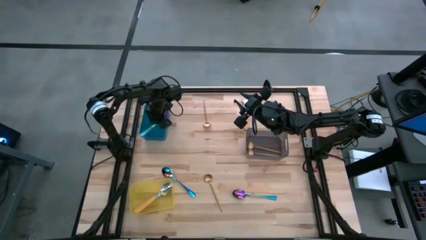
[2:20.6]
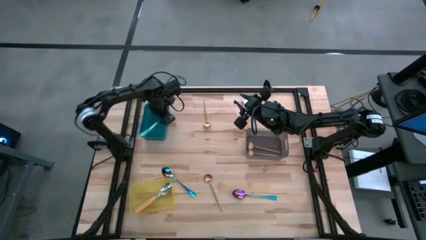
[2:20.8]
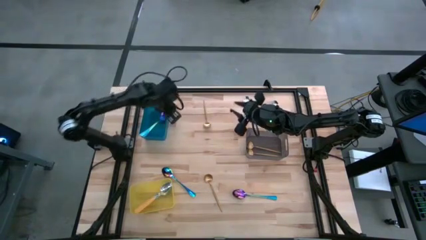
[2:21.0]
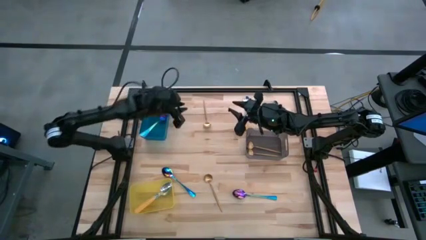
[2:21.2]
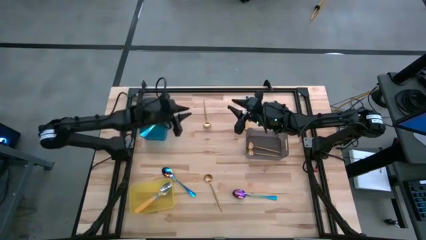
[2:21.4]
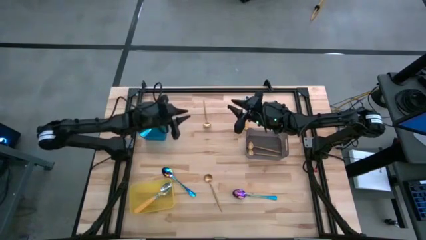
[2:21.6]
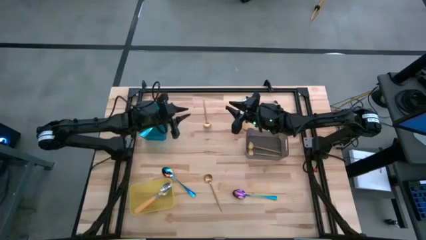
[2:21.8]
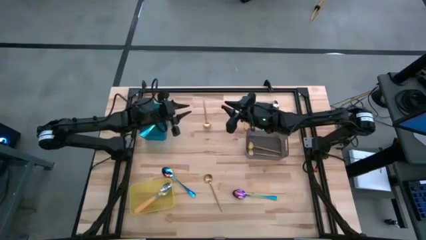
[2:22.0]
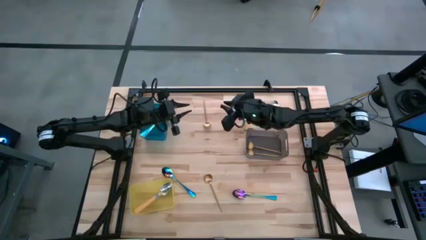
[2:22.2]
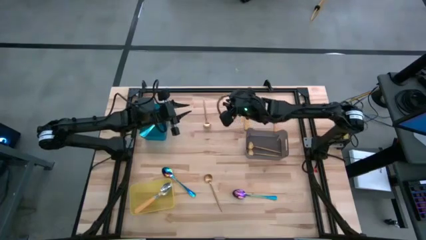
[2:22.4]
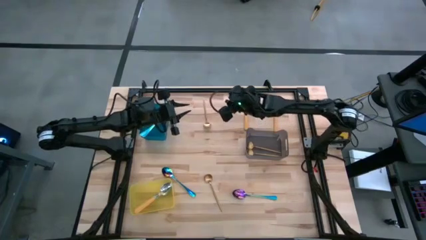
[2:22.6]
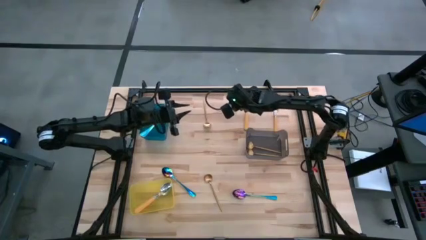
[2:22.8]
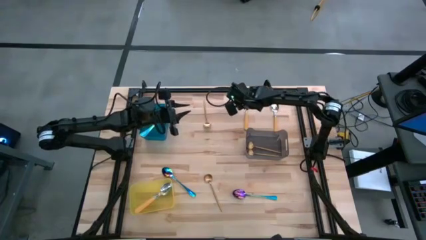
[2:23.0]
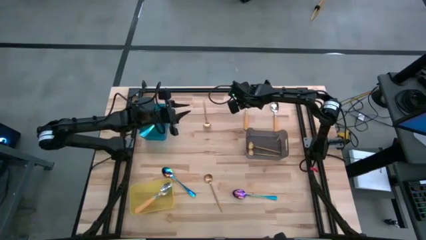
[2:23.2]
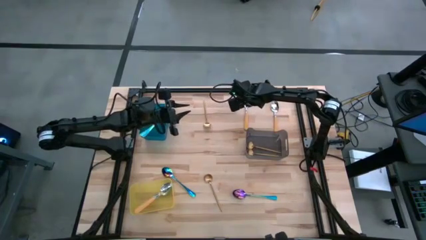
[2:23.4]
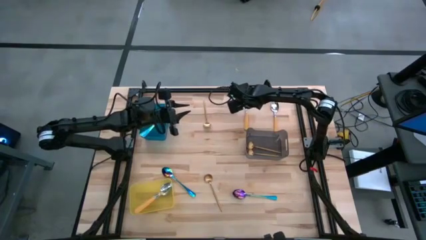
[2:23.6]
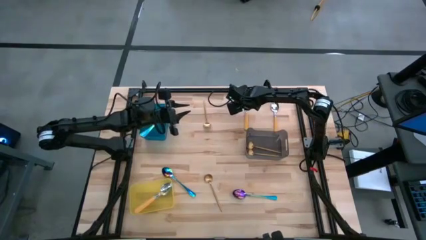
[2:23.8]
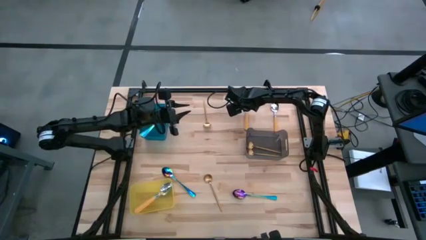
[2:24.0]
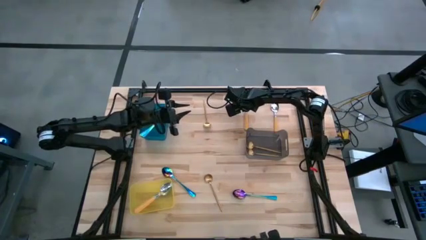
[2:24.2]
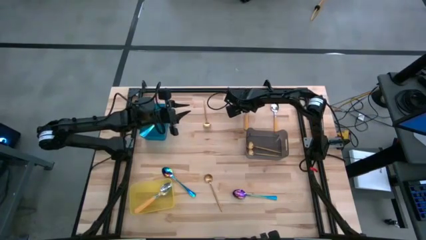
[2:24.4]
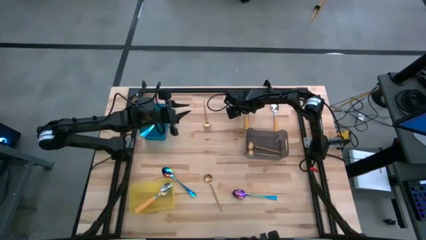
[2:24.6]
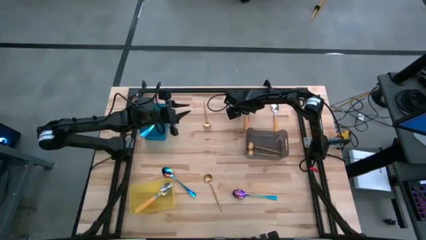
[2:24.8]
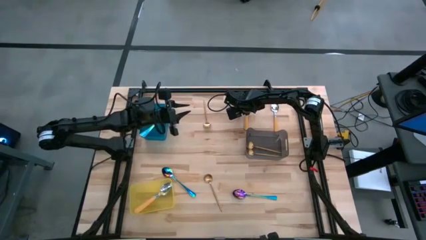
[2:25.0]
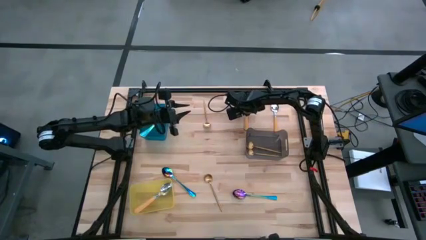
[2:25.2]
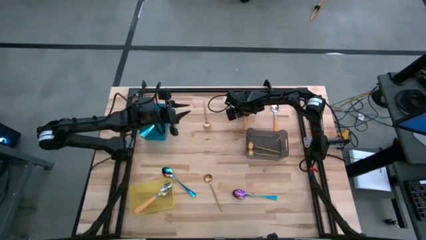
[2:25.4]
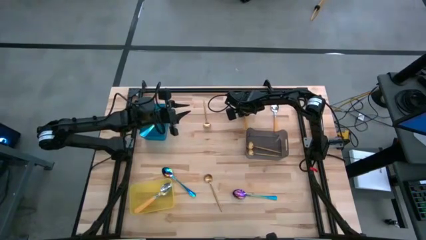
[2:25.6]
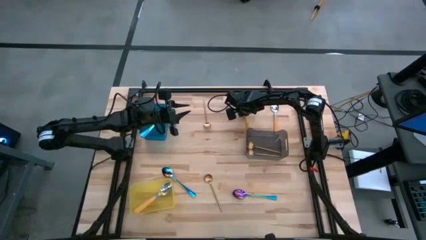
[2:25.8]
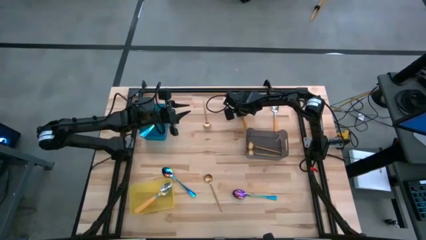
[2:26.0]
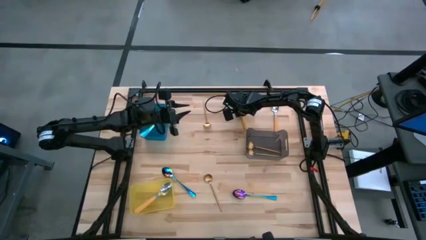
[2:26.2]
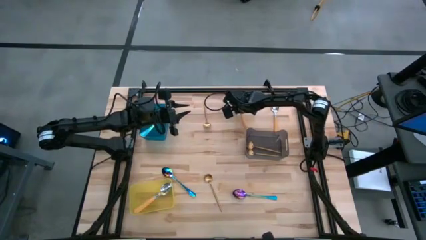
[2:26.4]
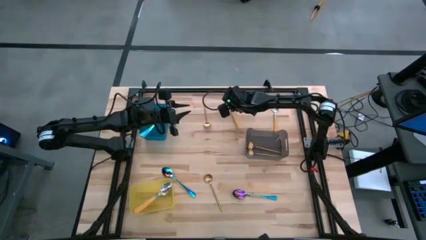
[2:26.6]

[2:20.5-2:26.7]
Task: Sort silverware by color (type)
Put the yellow spoon into the yellow bin

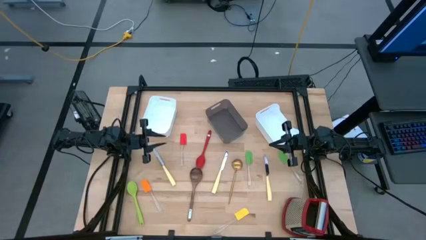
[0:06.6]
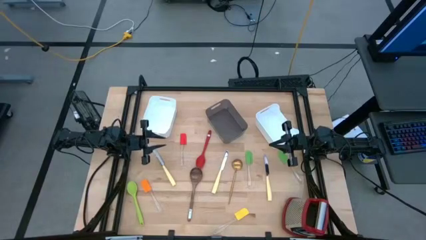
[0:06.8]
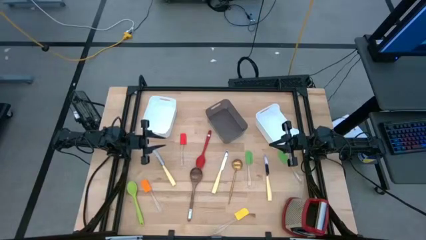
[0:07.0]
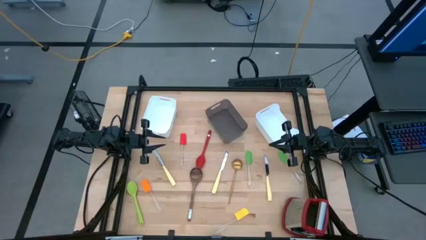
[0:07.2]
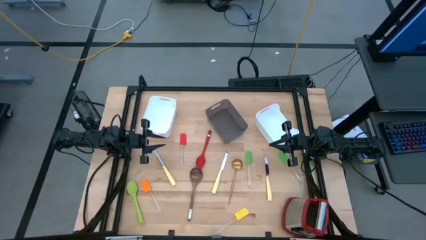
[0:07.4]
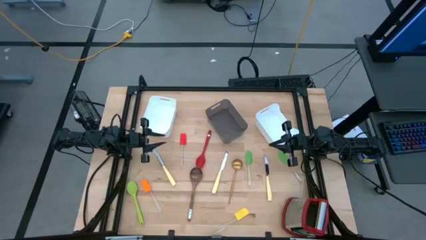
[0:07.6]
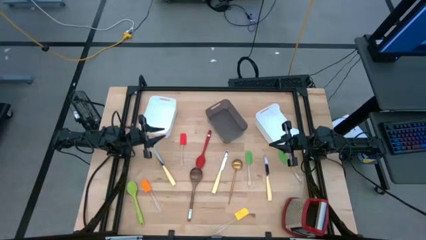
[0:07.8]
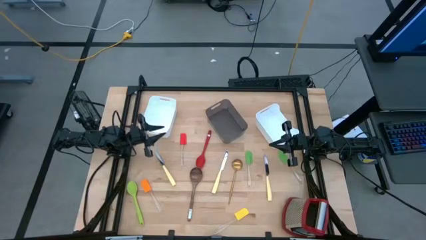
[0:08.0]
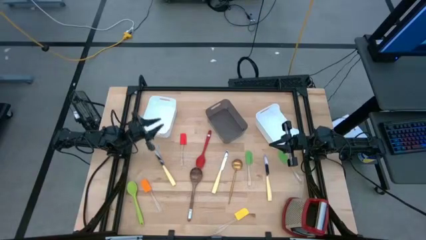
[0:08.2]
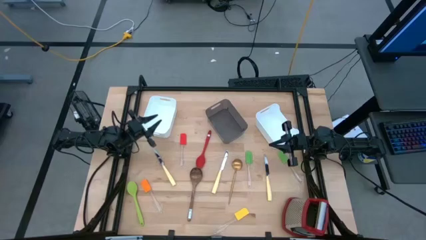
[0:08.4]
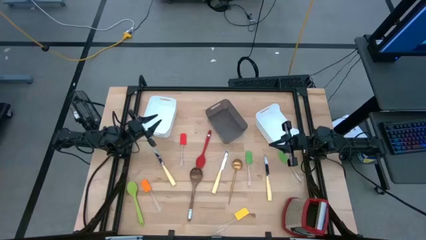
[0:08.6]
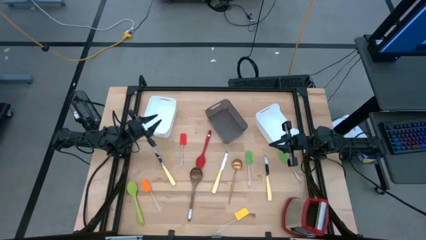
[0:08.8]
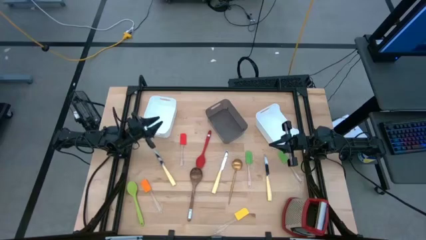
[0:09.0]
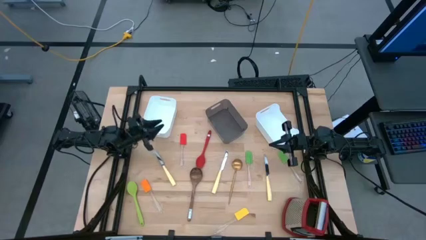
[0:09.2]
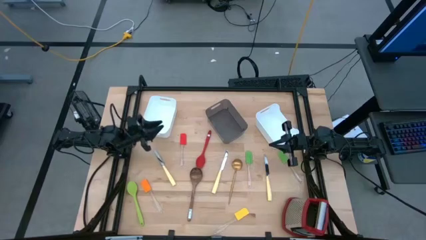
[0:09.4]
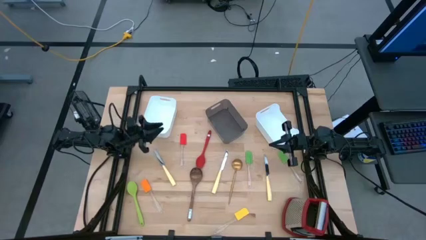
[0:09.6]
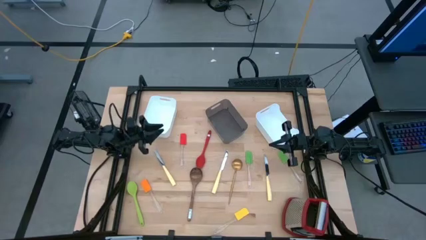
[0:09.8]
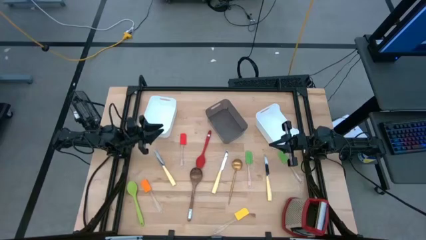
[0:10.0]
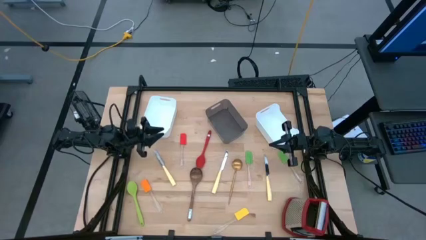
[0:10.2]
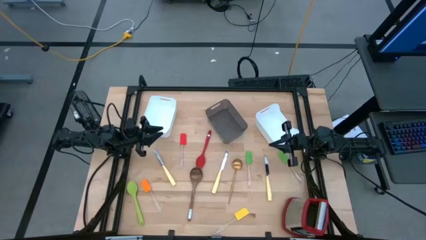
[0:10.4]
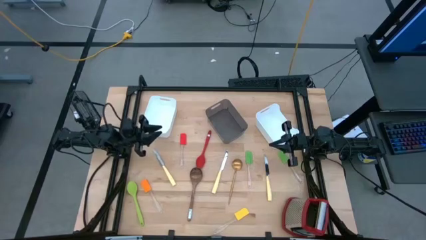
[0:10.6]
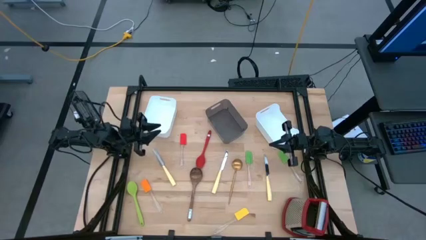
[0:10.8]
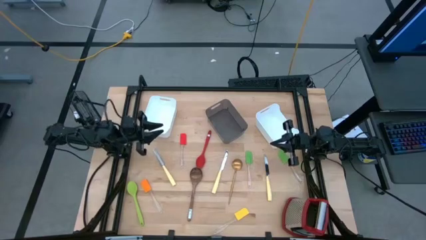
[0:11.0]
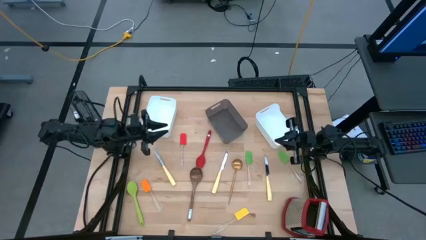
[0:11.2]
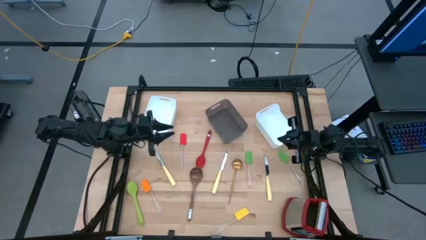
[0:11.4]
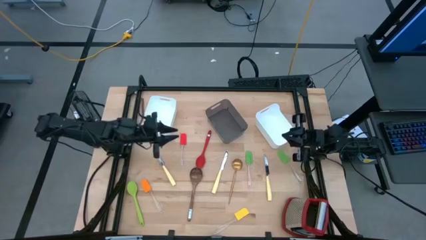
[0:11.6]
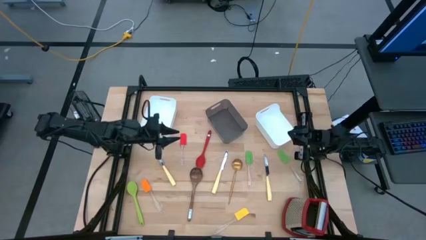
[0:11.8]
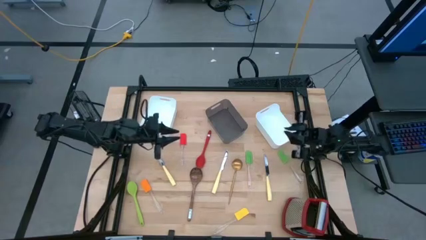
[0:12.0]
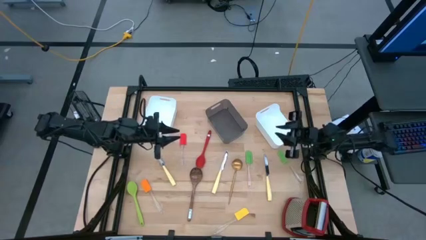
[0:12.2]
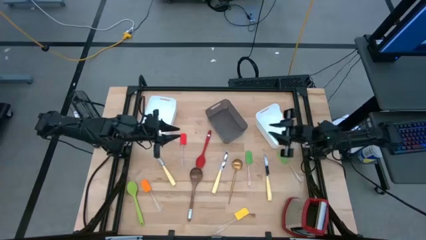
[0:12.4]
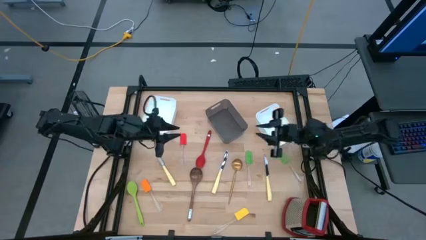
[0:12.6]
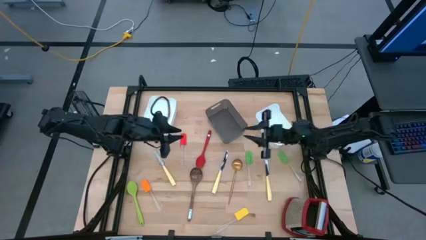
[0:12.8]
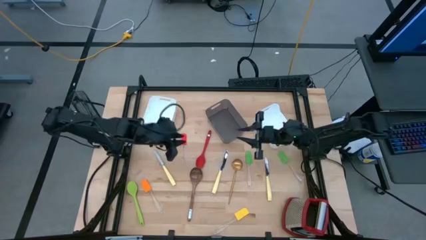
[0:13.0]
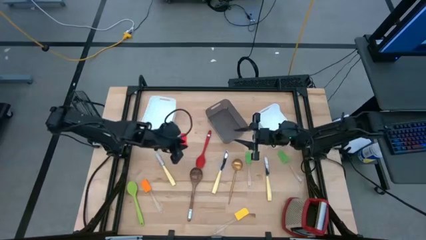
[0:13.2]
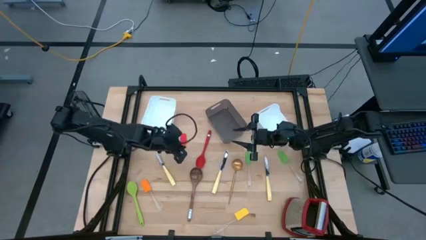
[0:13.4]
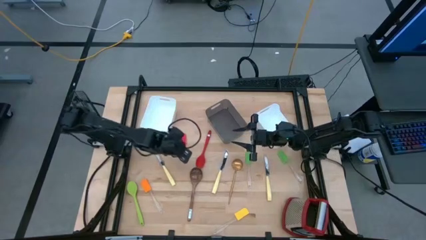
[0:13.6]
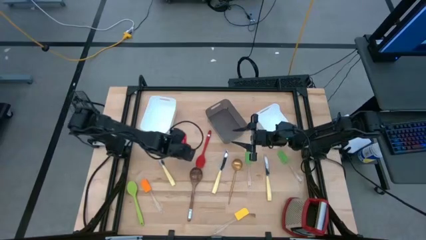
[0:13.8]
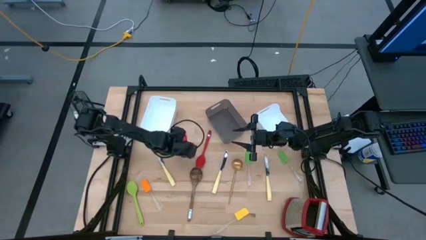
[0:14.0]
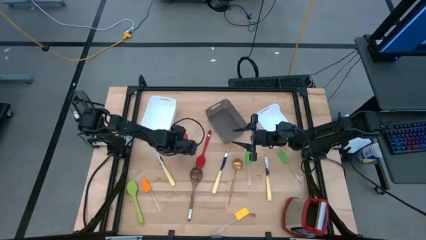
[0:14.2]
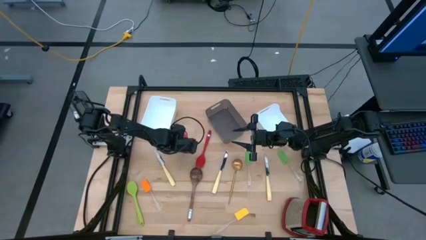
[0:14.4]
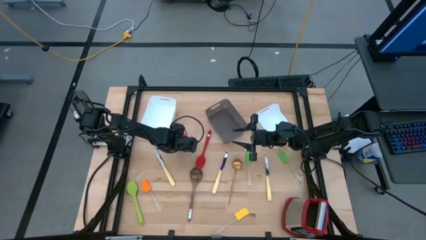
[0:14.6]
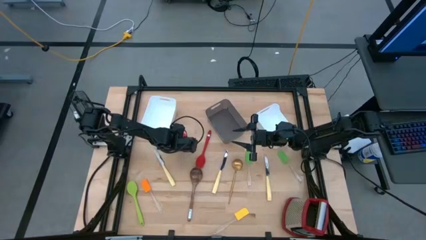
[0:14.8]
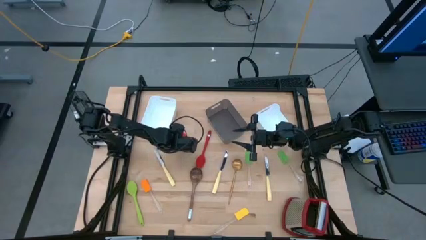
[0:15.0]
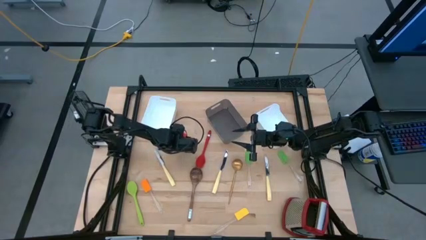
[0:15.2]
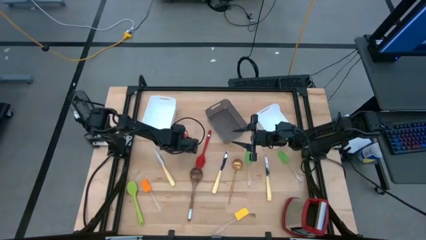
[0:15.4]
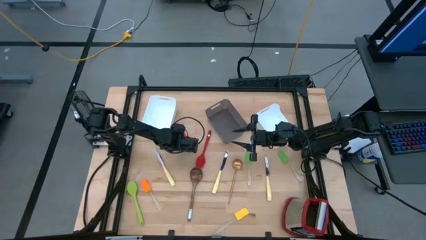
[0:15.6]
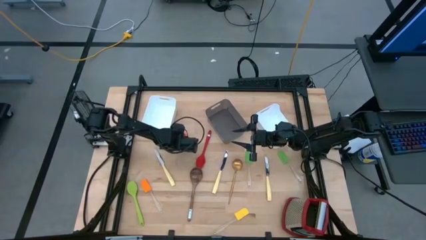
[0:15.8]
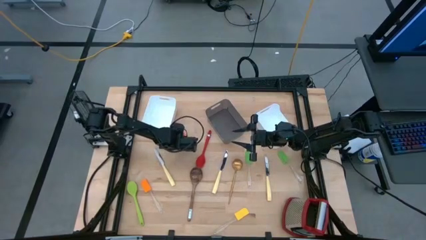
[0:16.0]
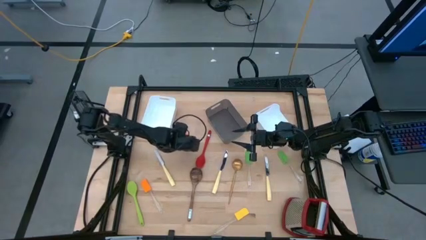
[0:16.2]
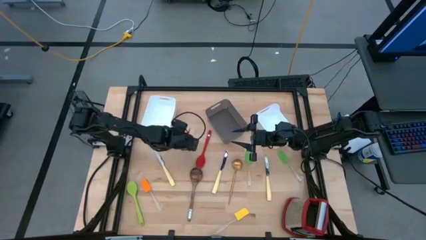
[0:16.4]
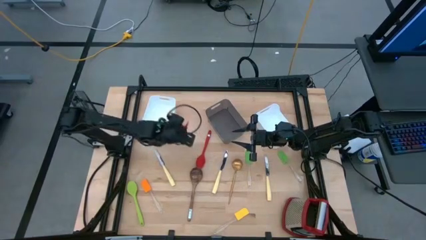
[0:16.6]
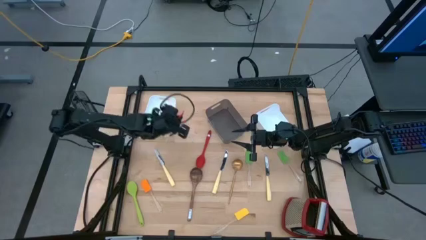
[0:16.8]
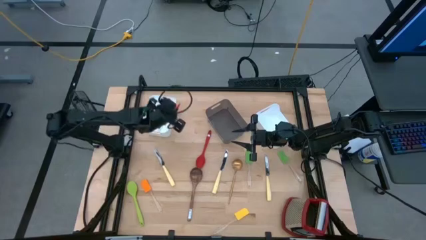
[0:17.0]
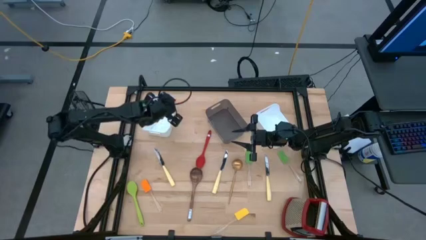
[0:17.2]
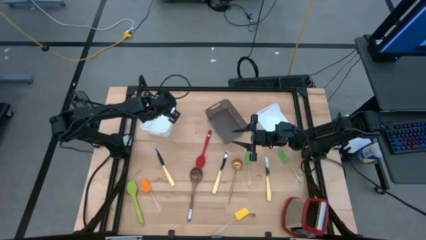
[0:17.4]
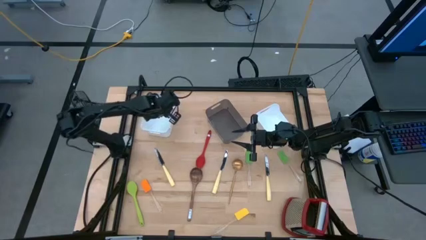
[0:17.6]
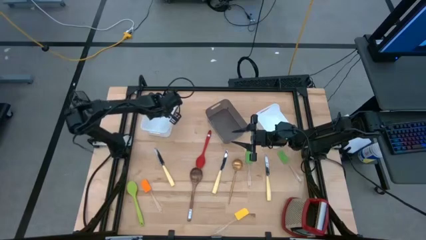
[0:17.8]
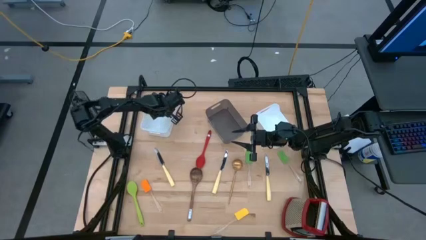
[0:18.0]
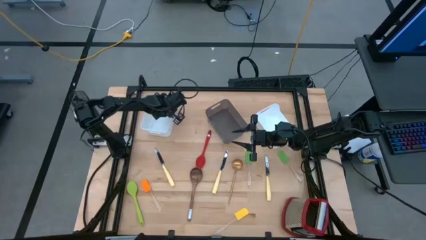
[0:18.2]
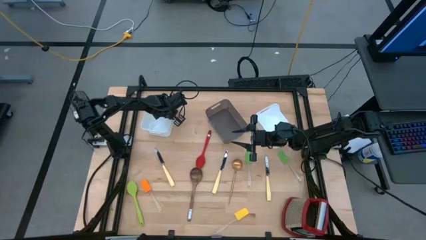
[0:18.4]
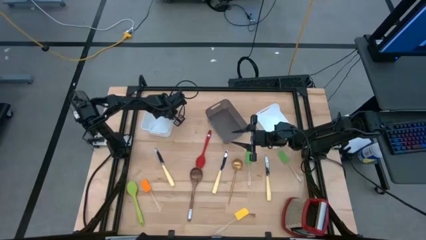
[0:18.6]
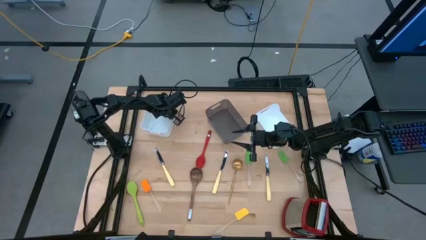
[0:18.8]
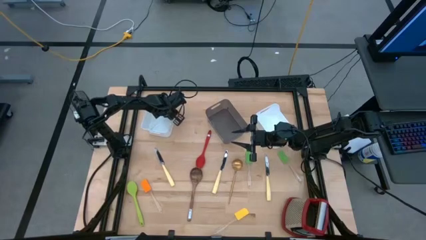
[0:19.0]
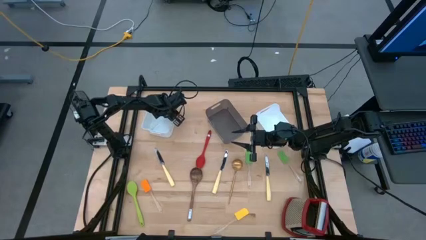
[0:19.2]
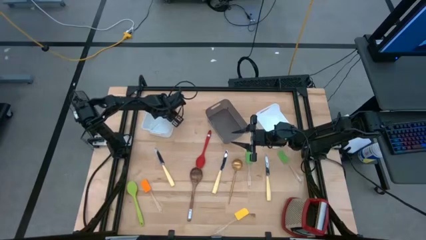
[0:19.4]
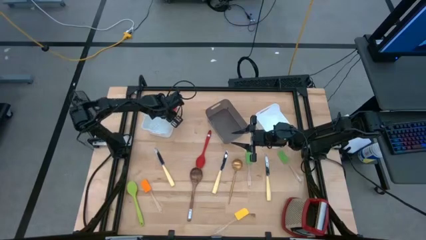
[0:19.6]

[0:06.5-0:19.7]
Task: Pick & Place Kitchen Items
Put the red spatula into the left white bin
